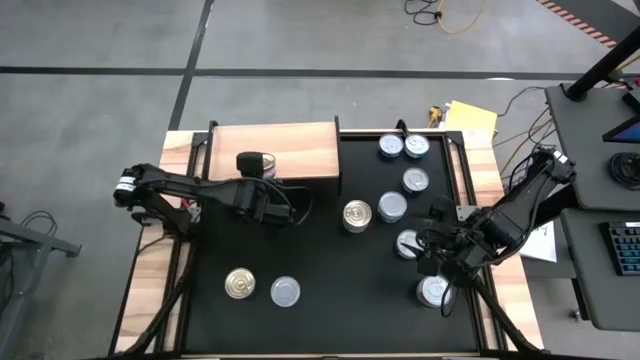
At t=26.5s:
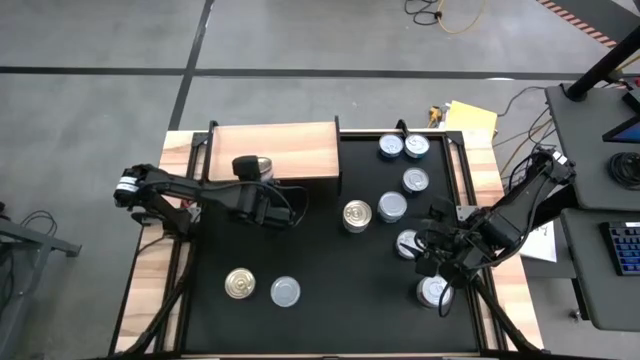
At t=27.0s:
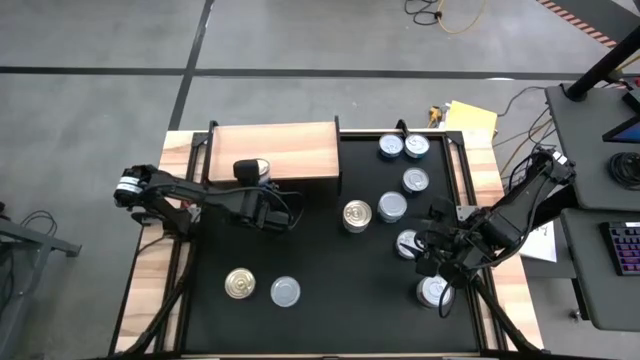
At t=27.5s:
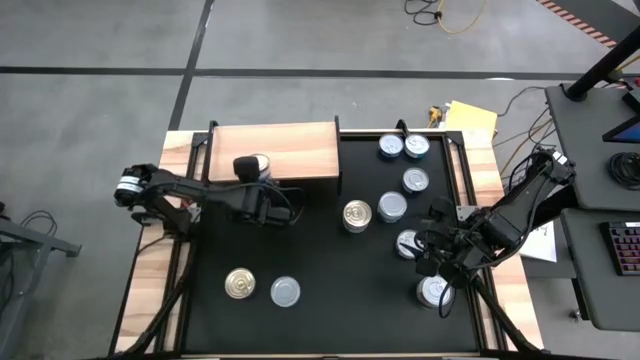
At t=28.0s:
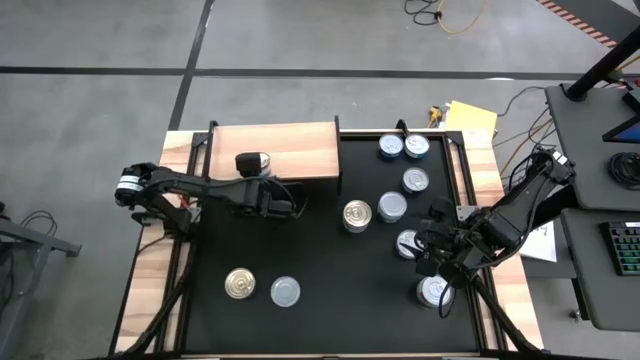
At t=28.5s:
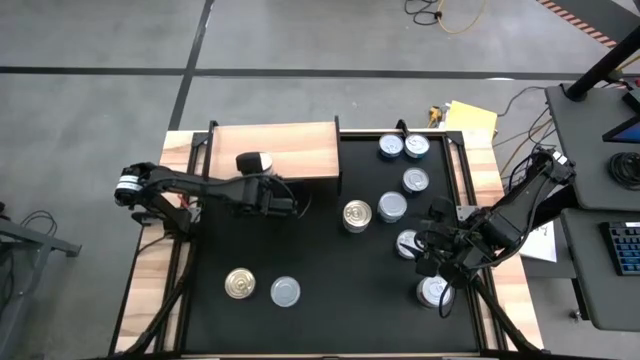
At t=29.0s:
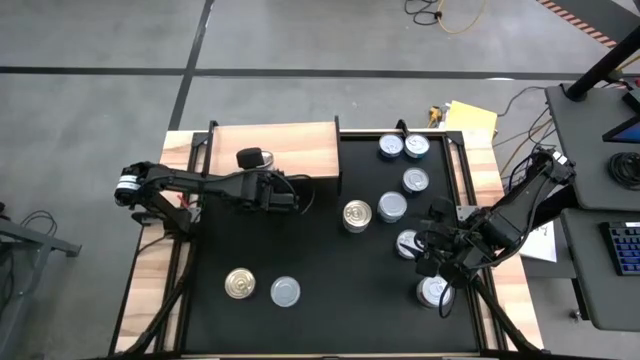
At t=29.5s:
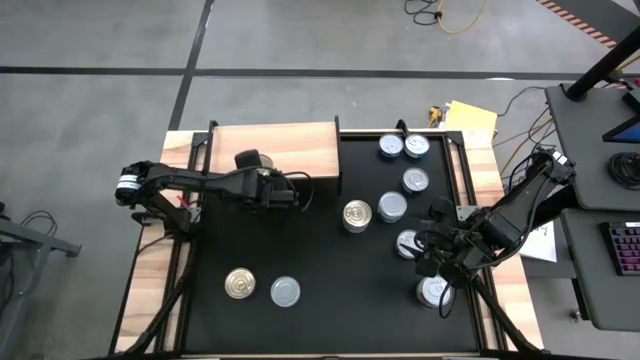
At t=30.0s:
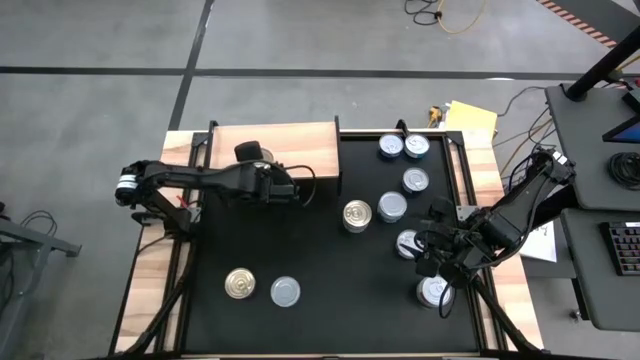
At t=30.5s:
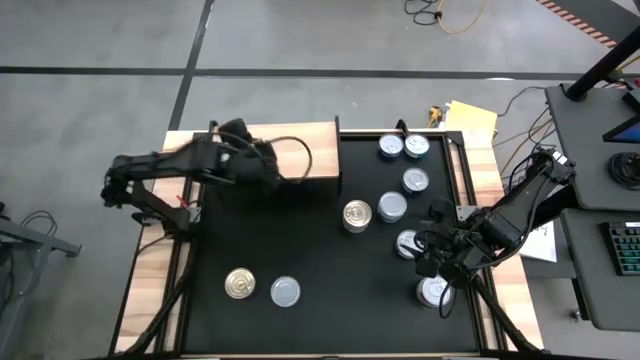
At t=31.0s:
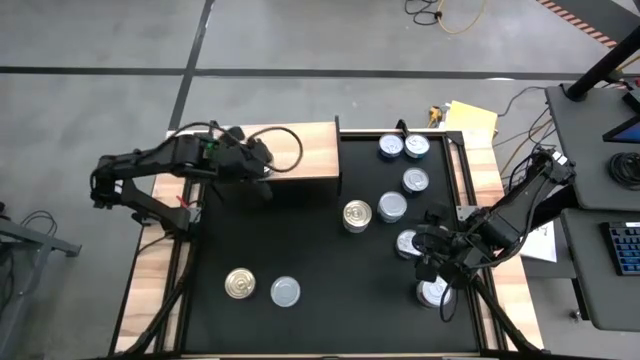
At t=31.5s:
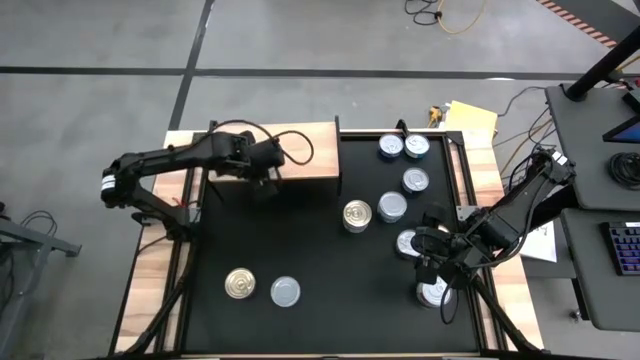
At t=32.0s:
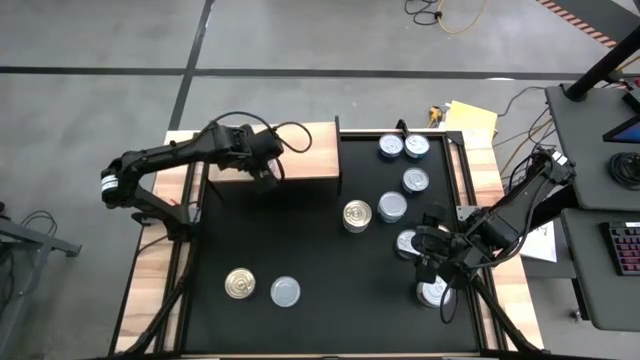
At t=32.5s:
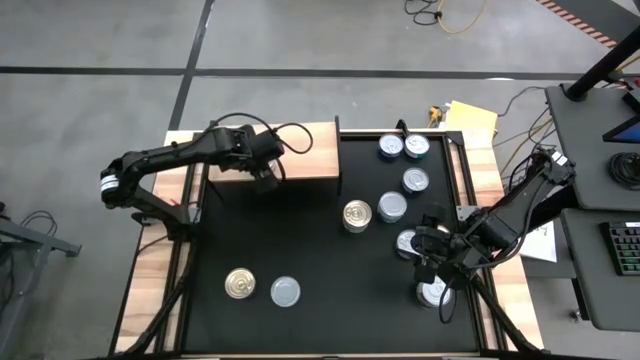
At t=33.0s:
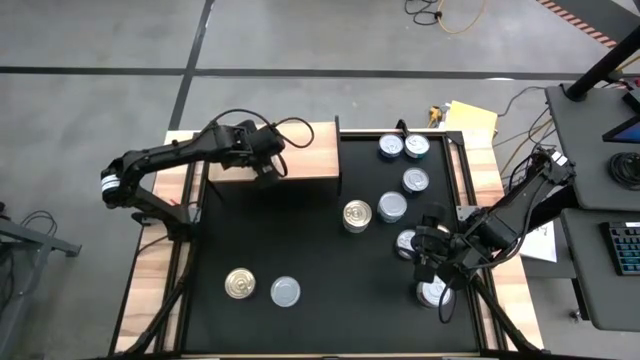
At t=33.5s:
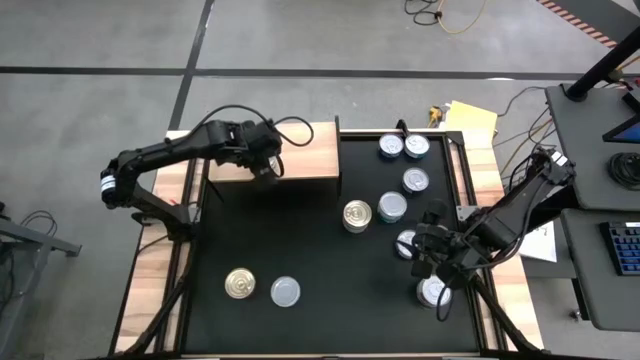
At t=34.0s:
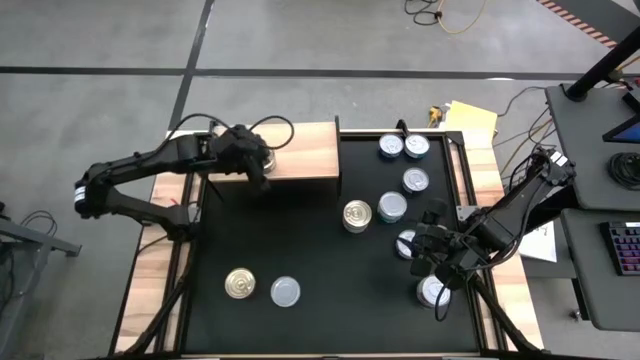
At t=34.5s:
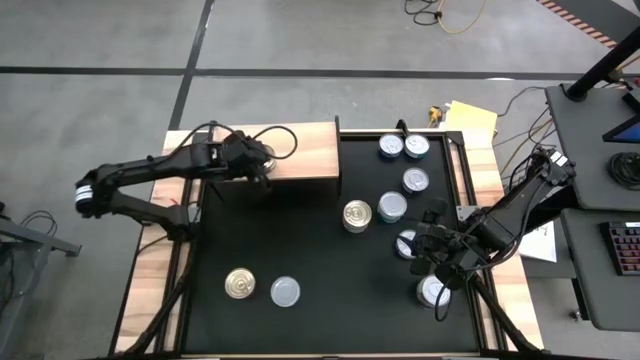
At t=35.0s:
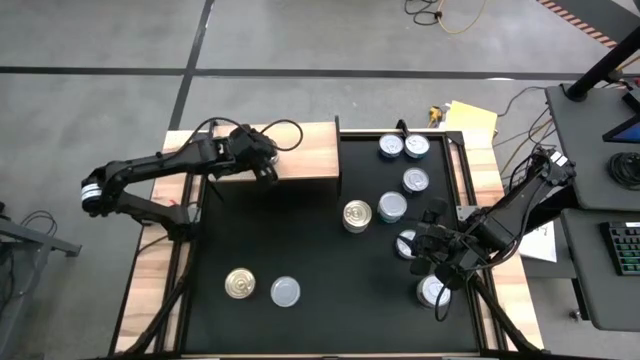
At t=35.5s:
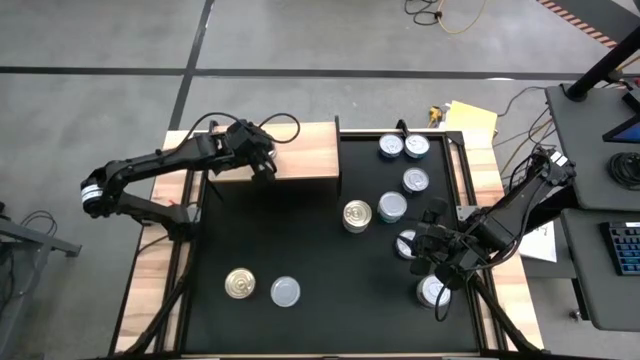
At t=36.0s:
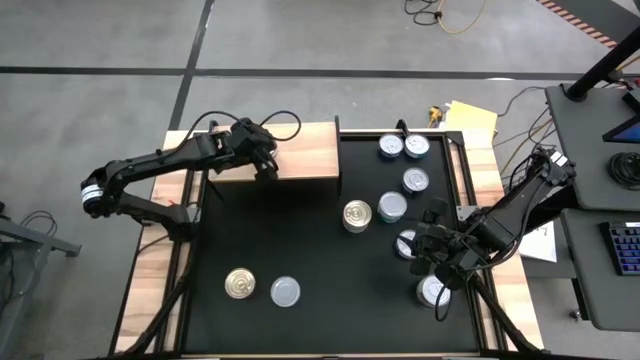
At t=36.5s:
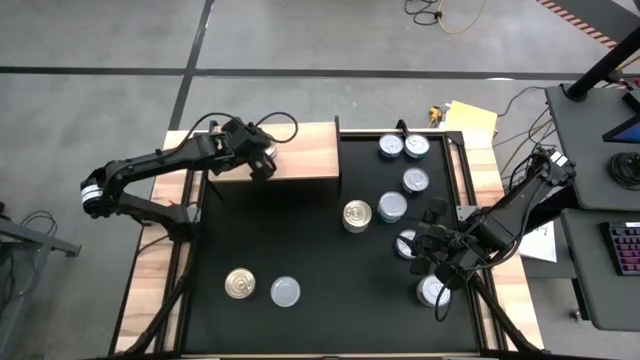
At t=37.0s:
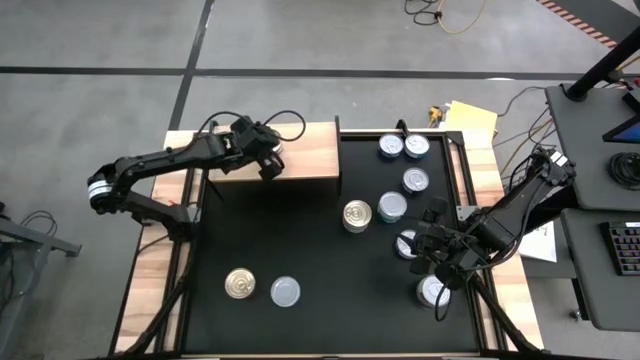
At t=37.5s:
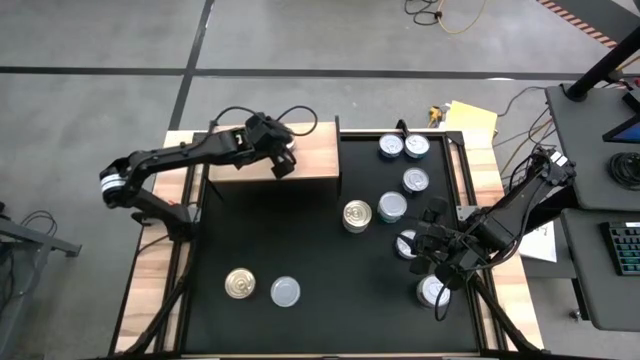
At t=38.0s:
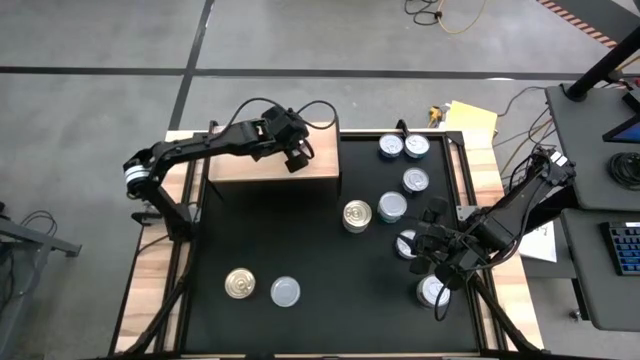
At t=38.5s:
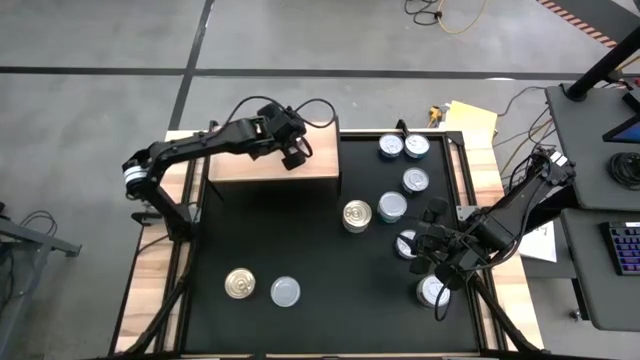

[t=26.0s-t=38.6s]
Task: Stack canned seafood by type on shelf
Put the blue/pink tuna can on the shelf

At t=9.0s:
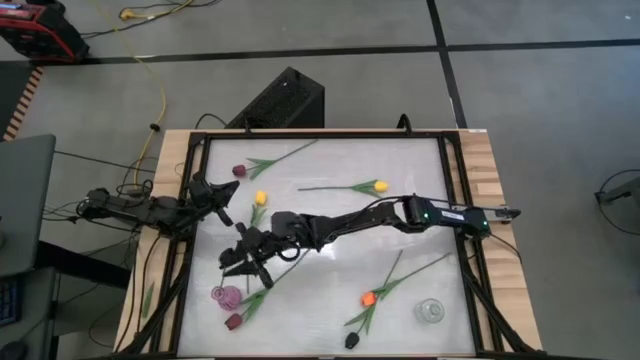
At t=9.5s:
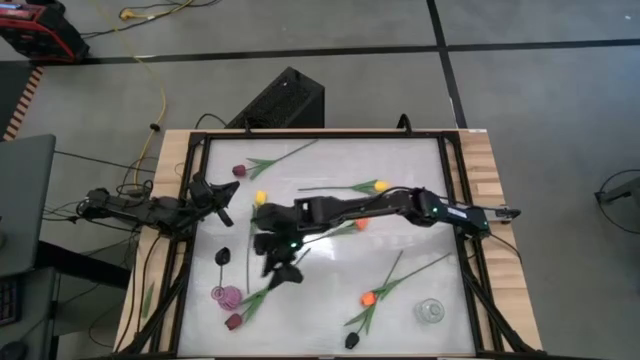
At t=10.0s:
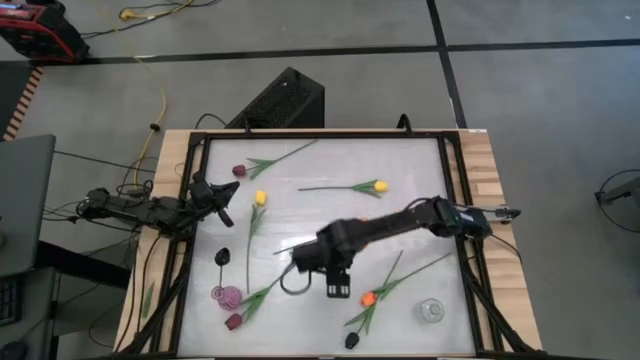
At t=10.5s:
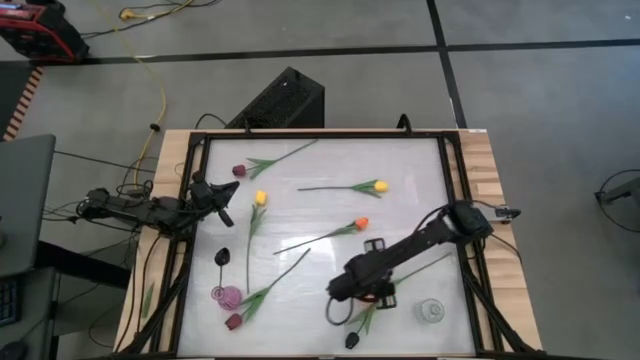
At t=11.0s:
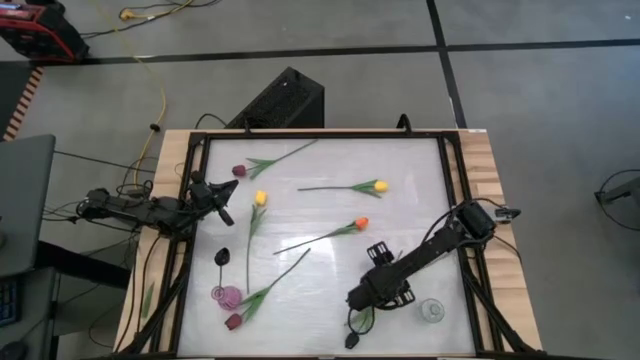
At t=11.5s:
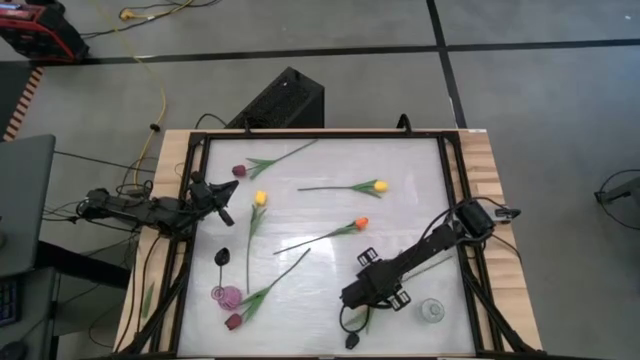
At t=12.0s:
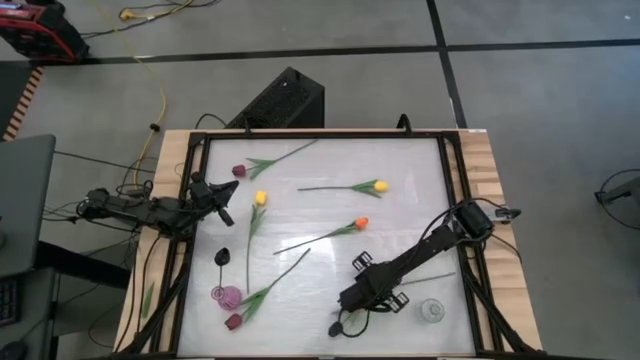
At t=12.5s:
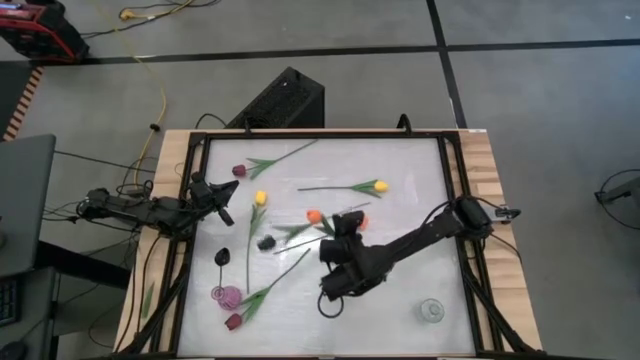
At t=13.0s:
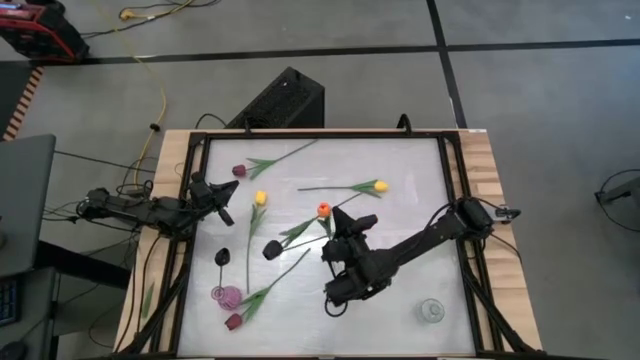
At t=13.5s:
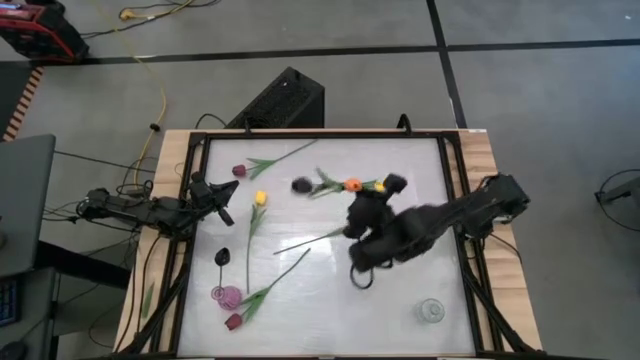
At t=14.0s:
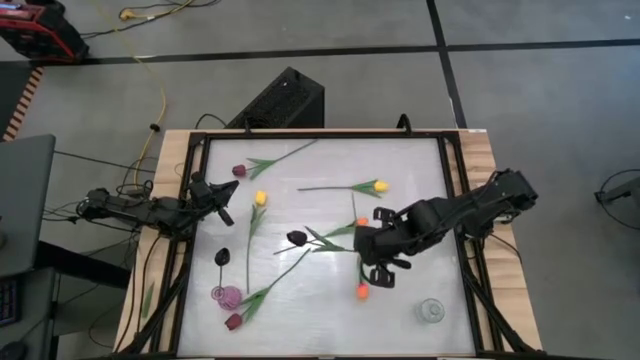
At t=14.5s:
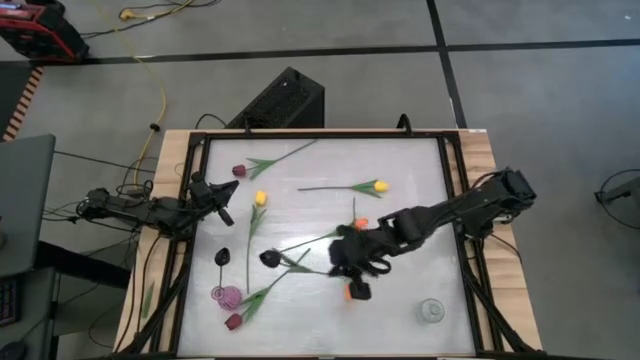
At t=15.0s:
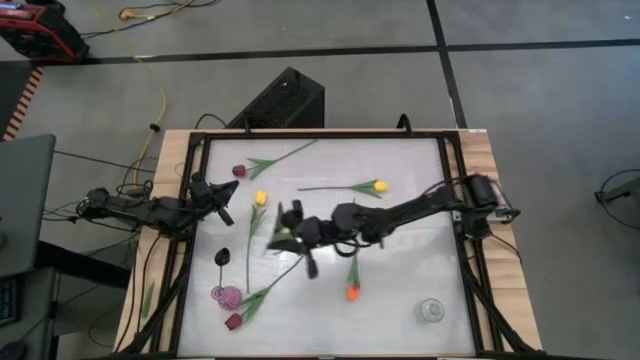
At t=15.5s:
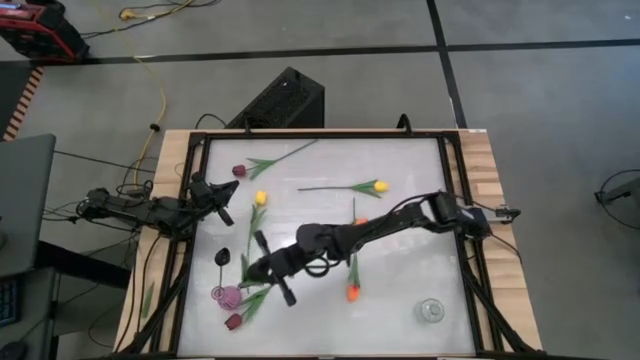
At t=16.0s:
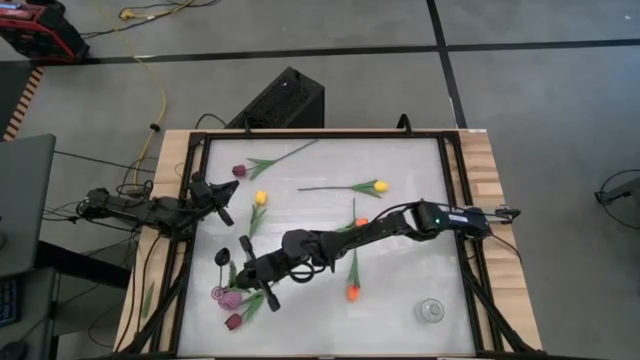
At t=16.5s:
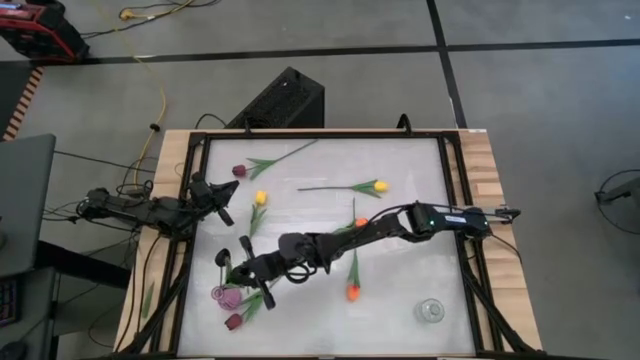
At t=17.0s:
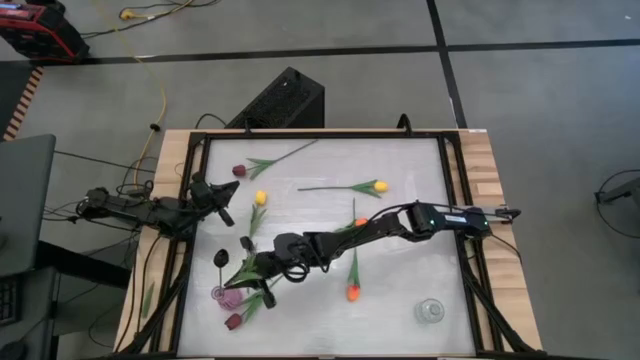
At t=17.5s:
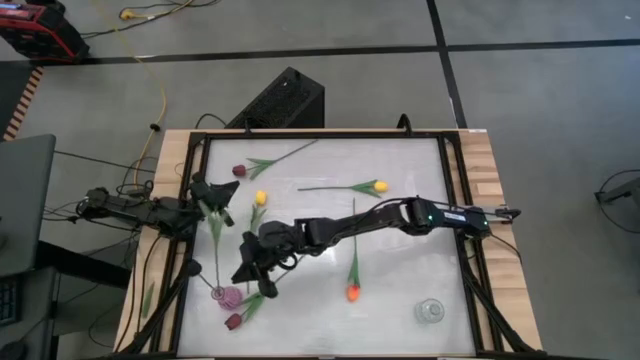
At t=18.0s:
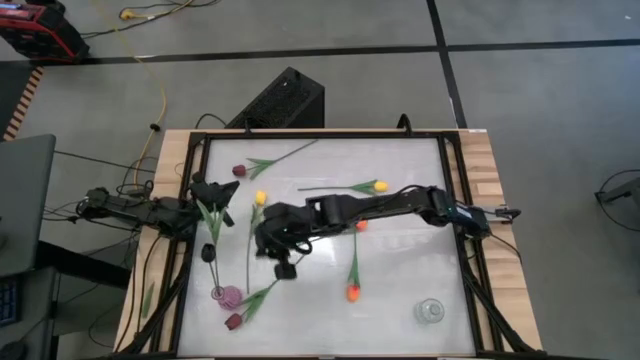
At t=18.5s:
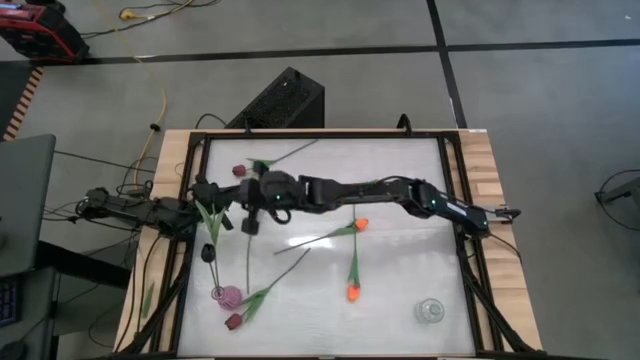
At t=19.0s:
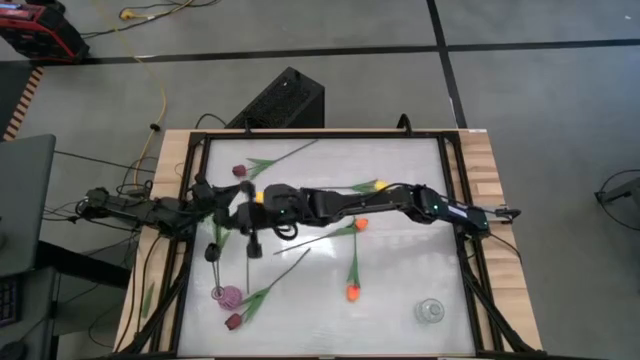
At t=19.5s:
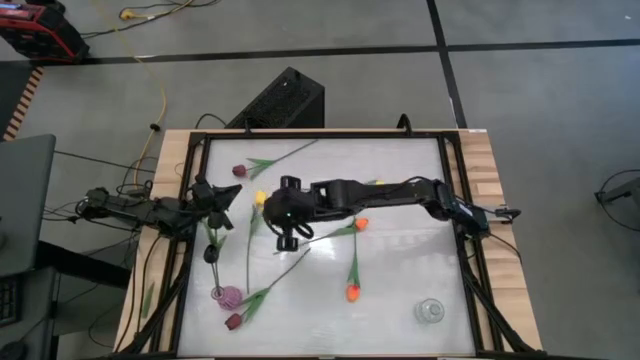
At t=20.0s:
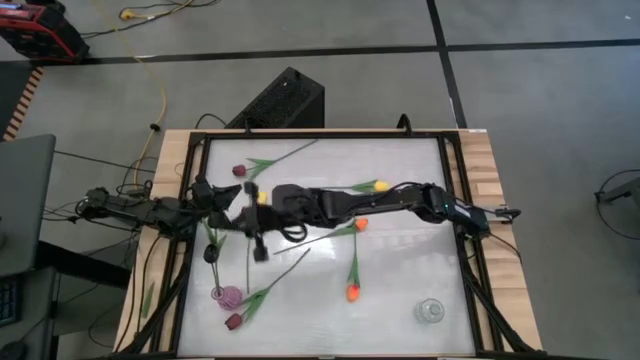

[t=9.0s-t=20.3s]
Task: Sort flowers into vase by color
Put the black flower into the pink flower vase
